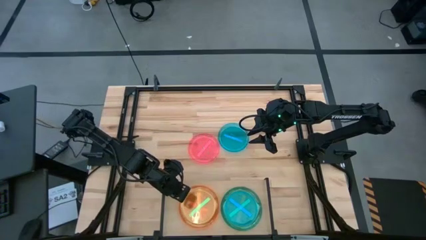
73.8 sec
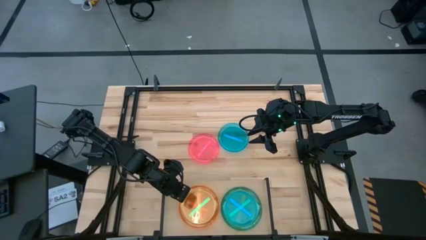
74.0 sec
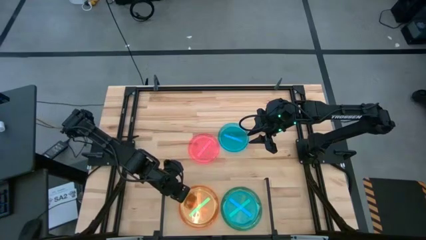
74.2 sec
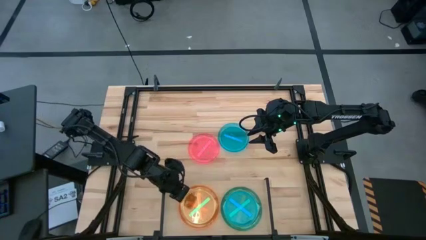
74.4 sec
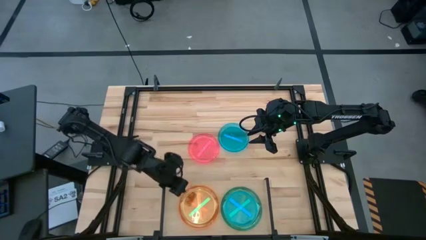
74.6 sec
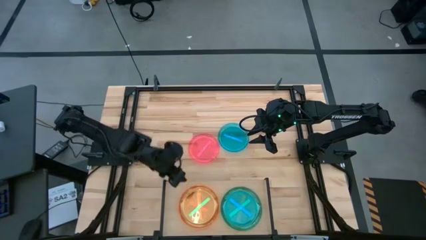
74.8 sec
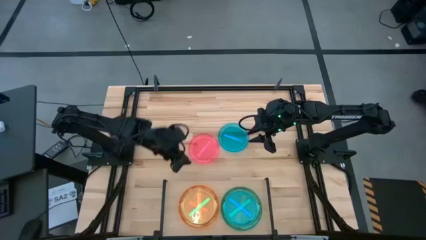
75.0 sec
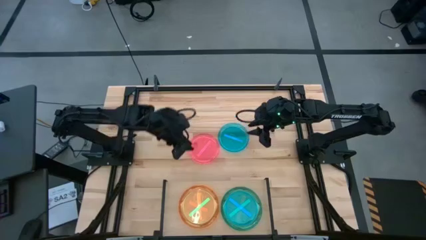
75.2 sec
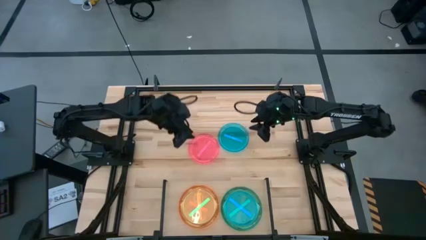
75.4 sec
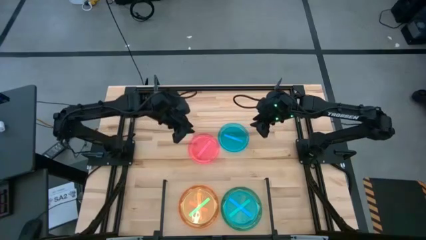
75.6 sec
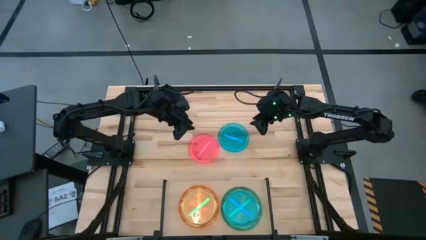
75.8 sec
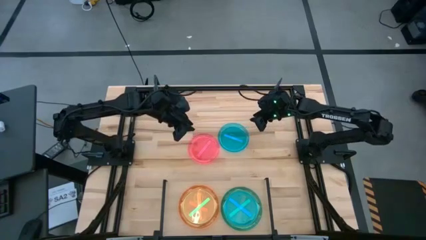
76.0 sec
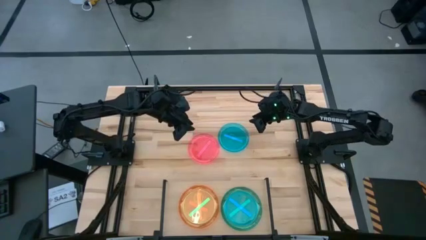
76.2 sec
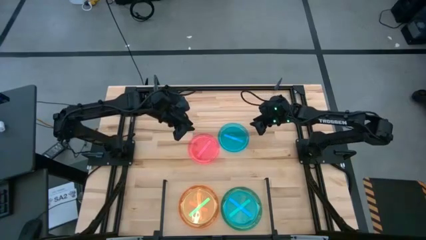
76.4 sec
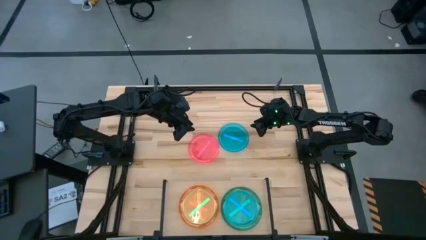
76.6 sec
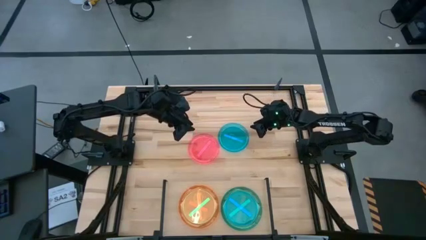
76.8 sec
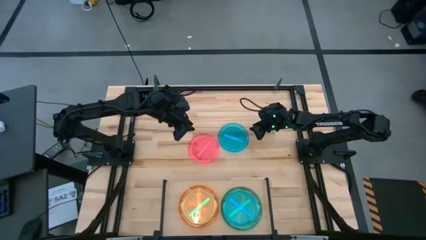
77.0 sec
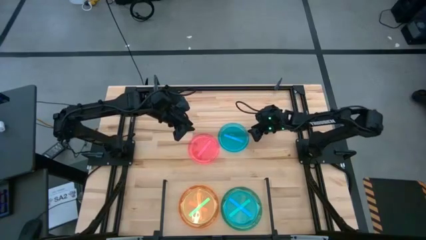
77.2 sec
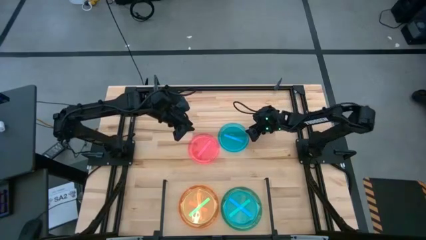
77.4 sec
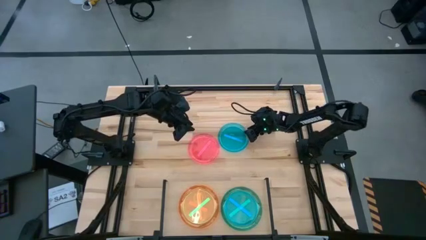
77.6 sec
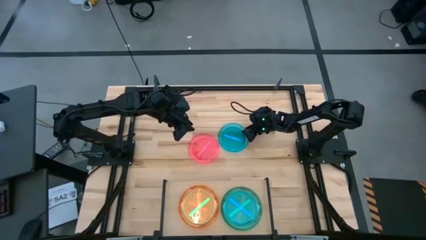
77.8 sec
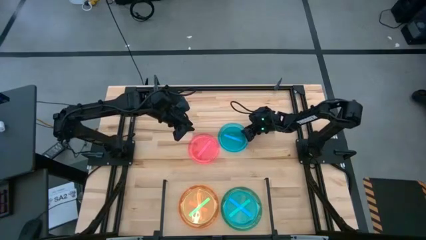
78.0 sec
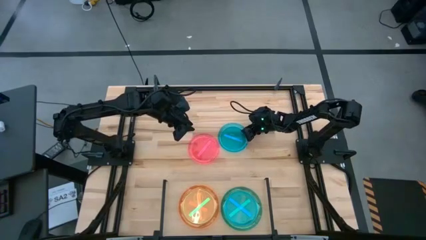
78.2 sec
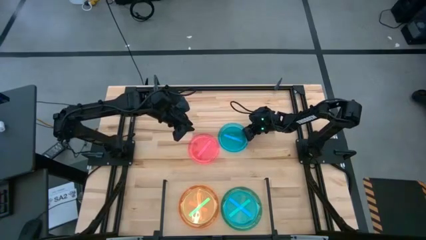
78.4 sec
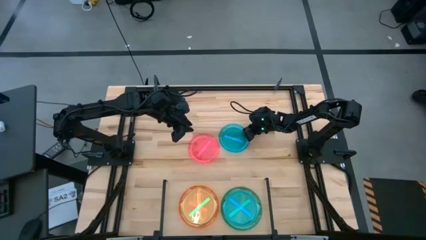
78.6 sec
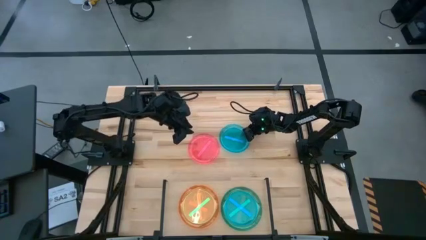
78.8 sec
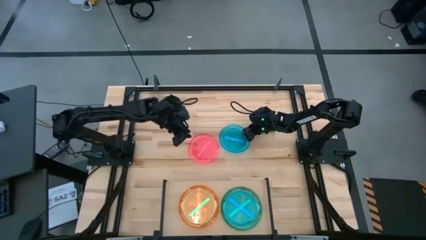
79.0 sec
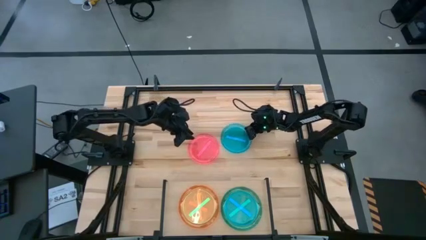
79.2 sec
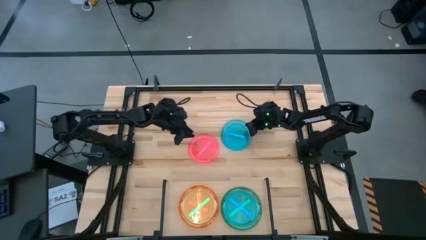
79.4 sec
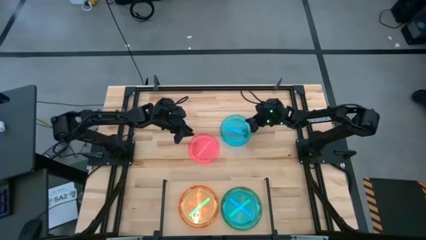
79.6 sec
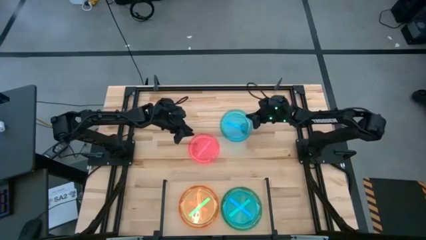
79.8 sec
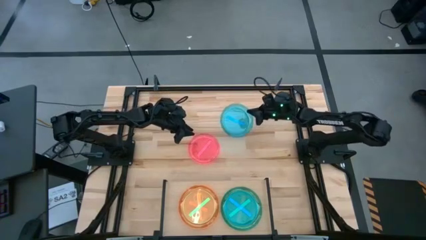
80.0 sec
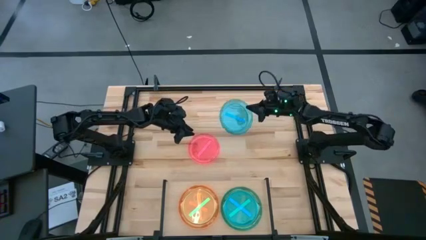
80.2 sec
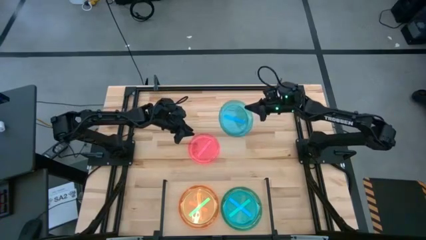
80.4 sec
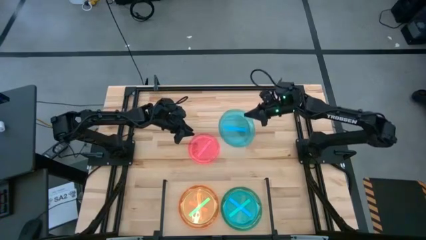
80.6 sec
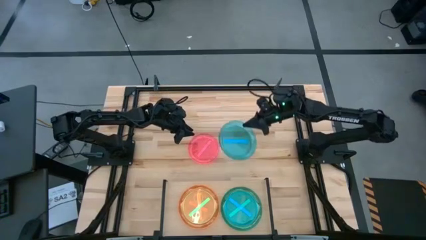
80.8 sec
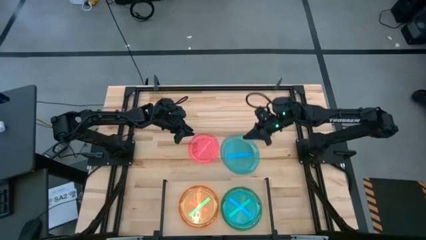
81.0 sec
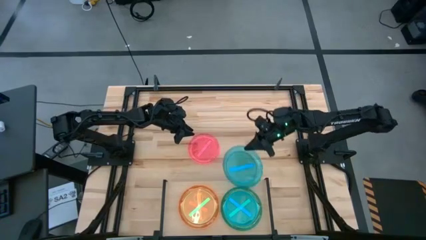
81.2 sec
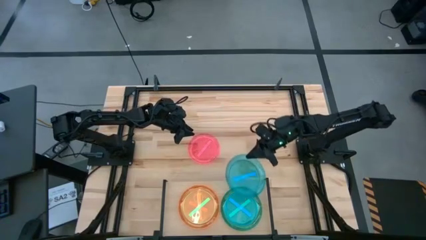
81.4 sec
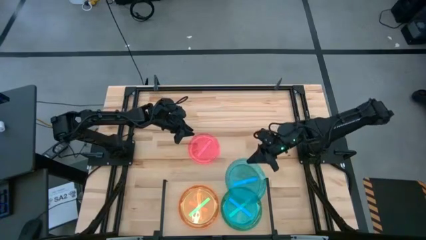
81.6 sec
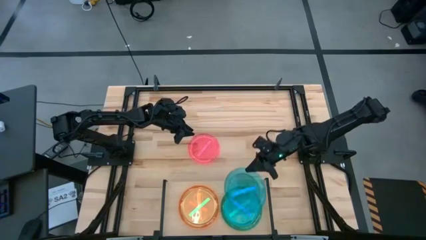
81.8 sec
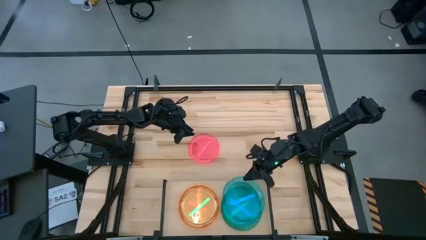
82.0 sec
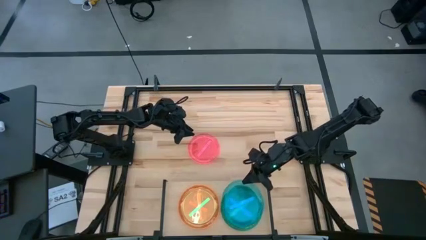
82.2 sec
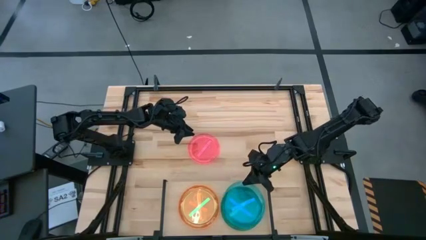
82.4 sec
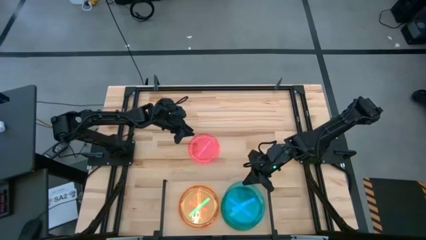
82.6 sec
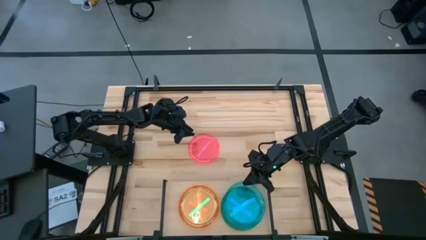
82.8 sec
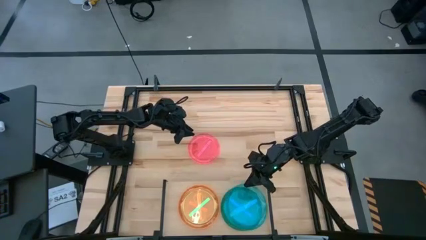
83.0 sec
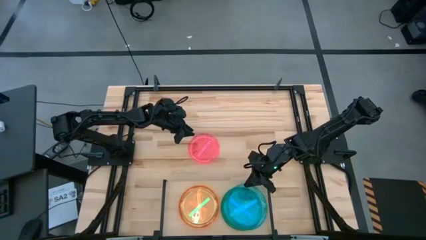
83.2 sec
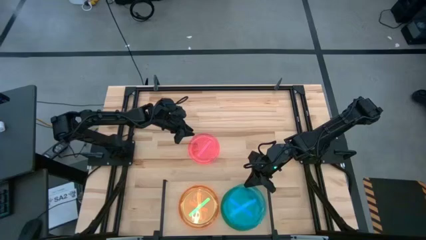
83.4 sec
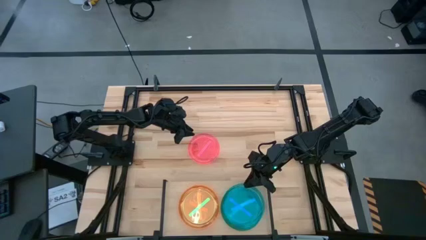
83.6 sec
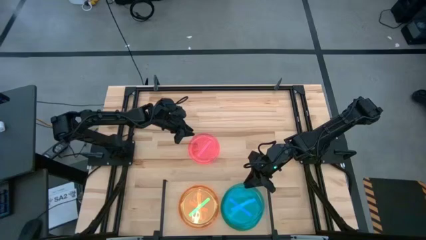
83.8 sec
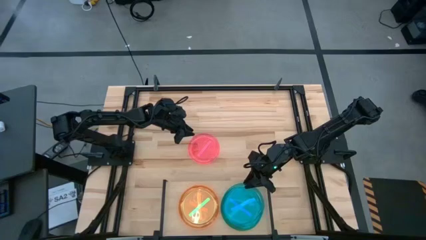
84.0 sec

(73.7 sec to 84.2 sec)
Task: Place and stack plates onto a shelf
Stack the blue plate on top of the blue plate on the shelf

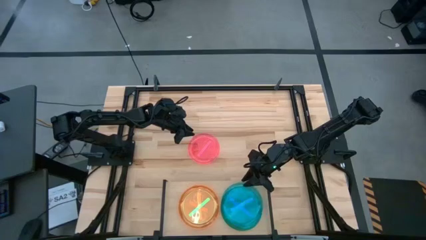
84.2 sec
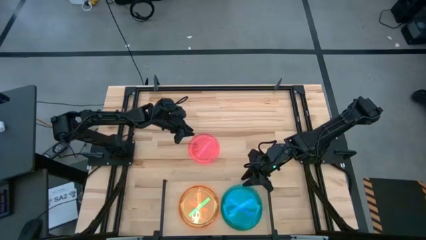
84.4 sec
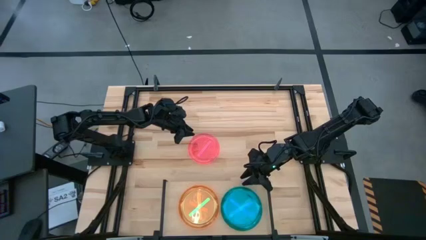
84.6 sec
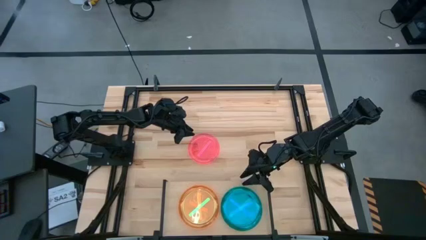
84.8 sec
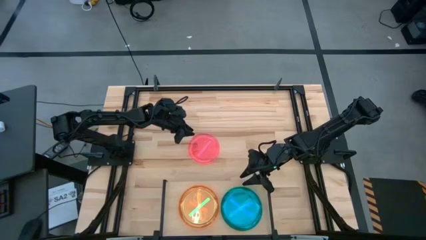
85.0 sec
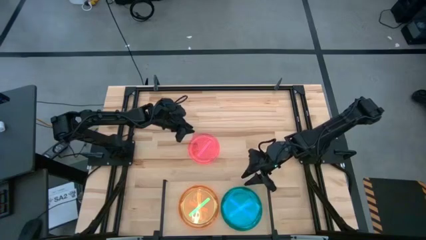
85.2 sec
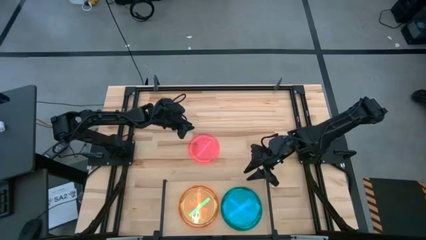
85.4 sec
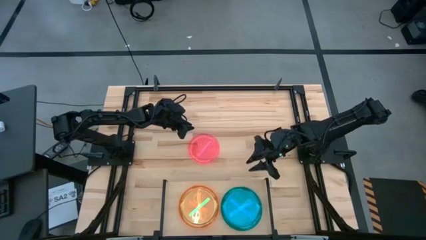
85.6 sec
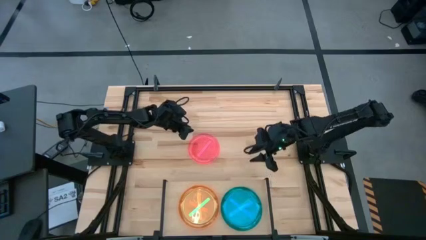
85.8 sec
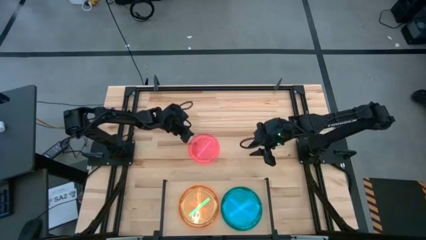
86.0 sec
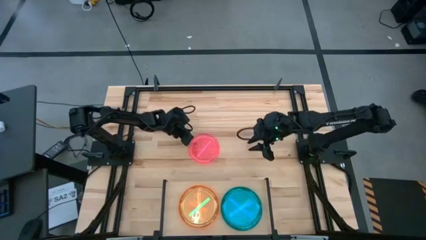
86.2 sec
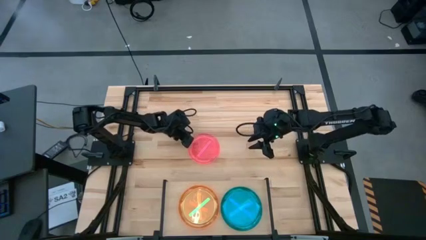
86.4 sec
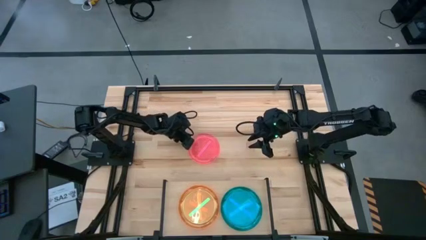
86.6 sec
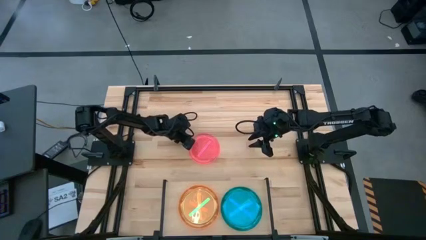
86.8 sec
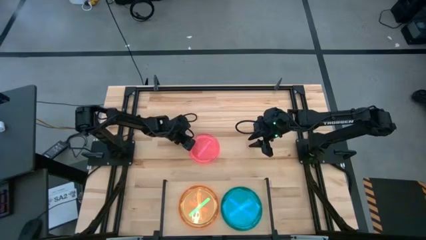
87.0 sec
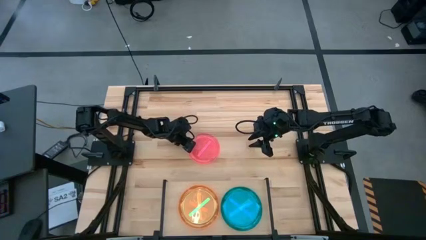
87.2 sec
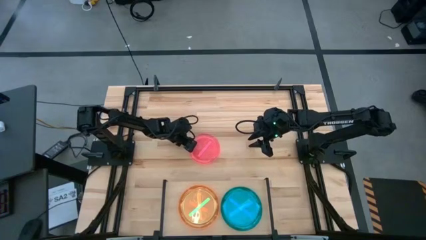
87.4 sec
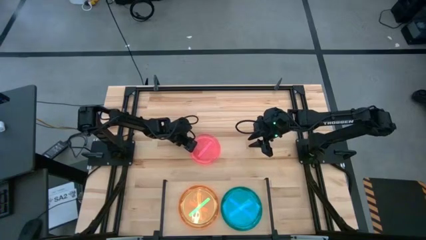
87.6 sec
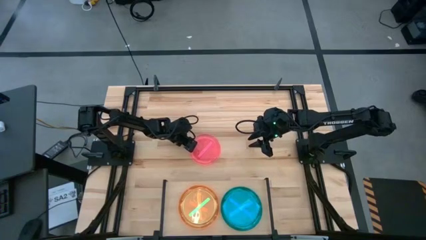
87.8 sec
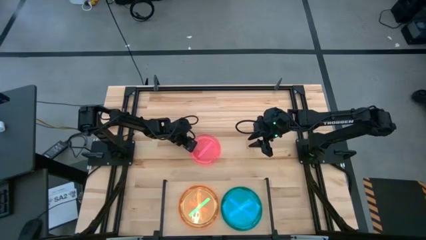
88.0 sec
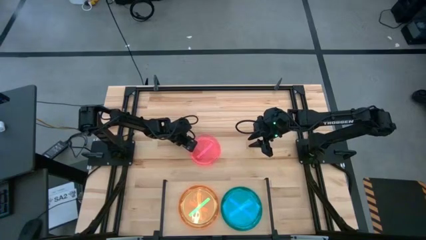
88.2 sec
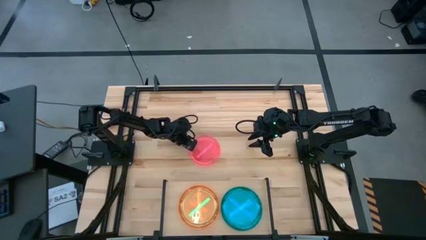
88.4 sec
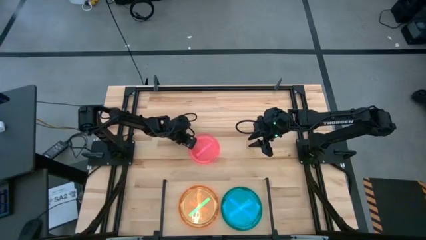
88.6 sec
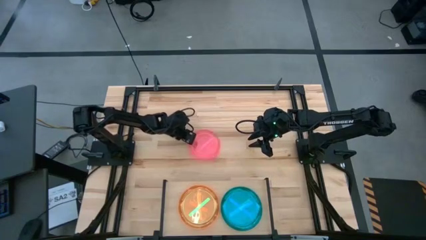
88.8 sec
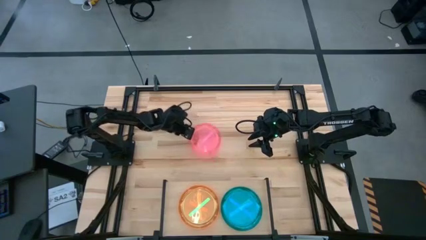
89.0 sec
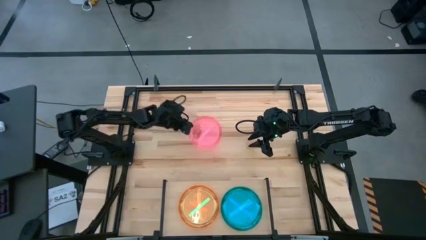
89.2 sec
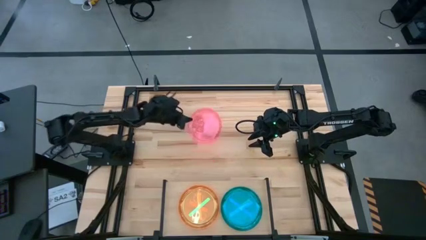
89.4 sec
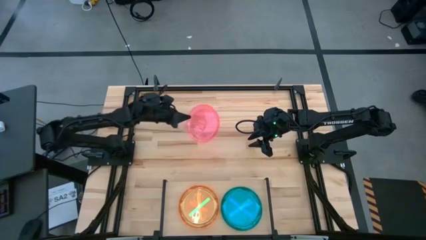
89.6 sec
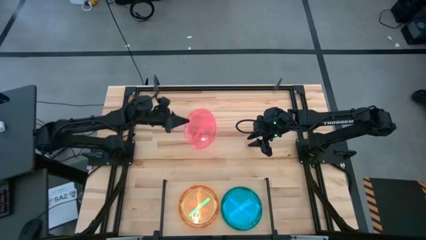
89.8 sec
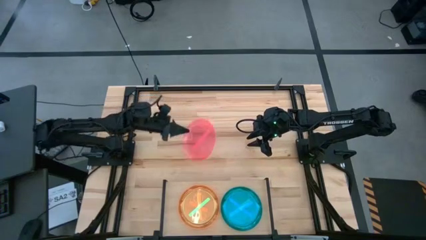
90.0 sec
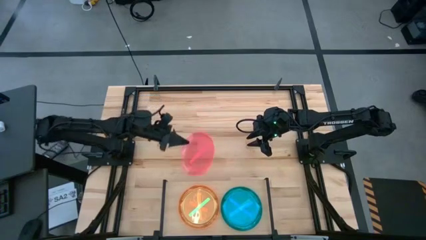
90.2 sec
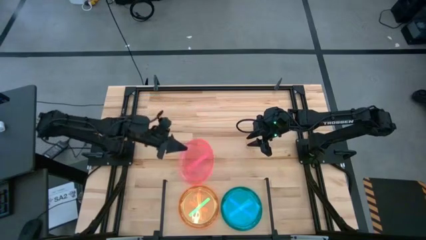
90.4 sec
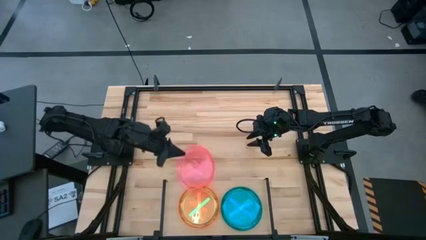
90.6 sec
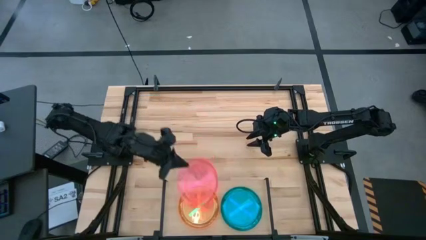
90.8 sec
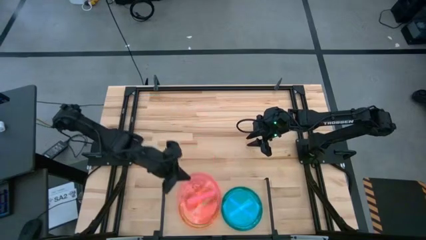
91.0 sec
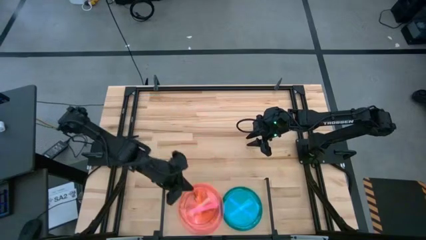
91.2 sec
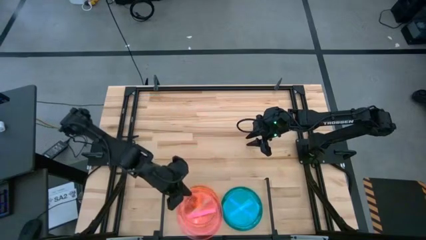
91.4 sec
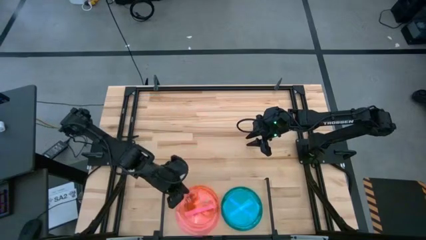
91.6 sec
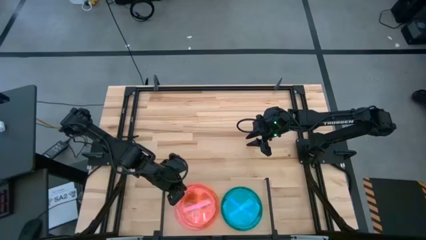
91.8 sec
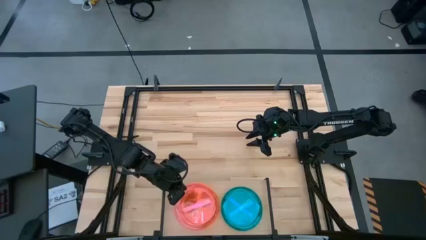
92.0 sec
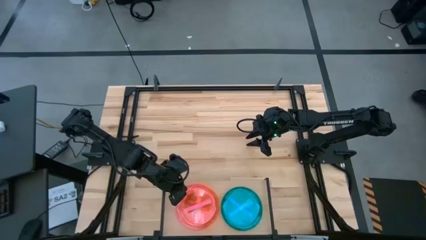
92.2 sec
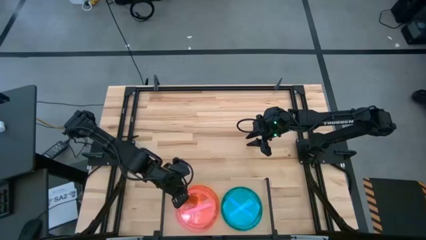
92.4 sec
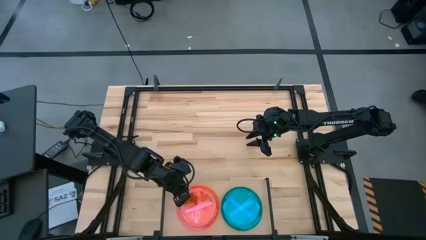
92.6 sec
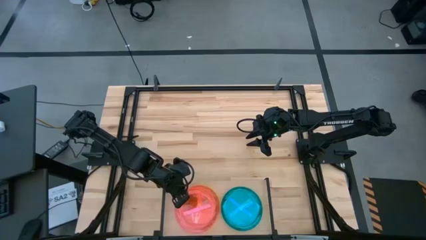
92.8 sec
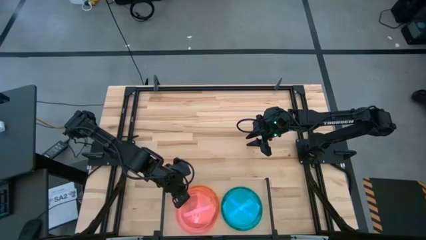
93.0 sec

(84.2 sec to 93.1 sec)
Stack the pink plate on top of the green plate on the shelf
